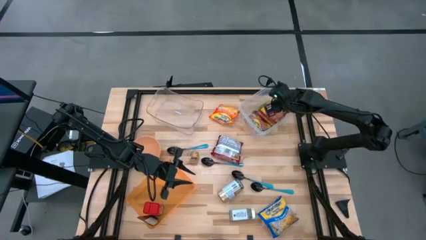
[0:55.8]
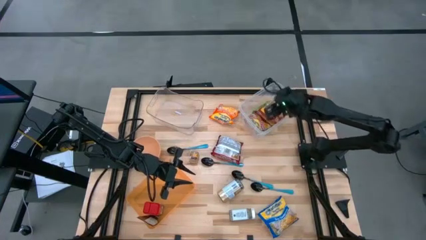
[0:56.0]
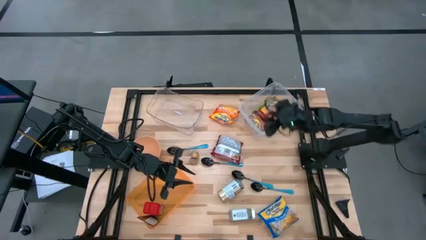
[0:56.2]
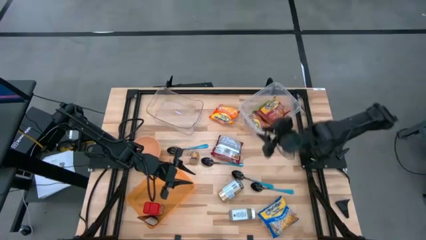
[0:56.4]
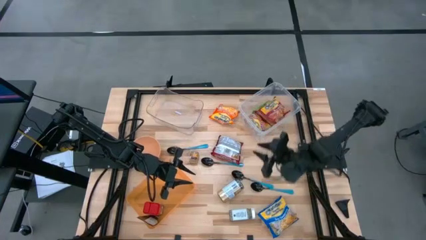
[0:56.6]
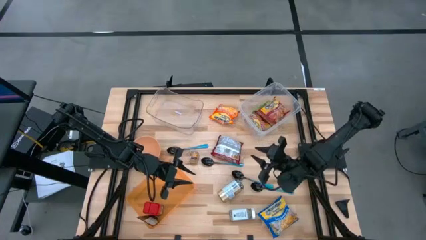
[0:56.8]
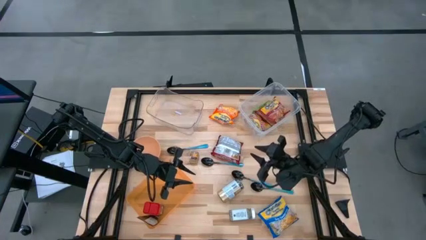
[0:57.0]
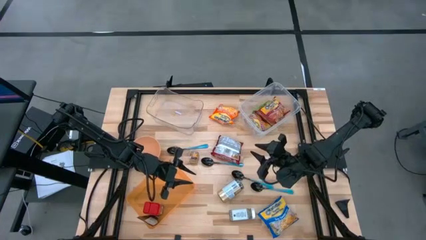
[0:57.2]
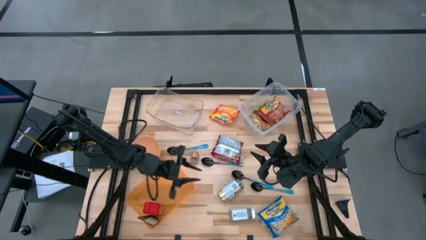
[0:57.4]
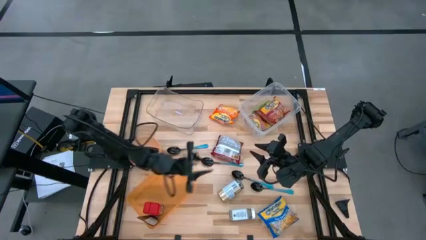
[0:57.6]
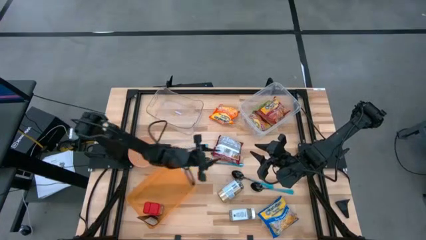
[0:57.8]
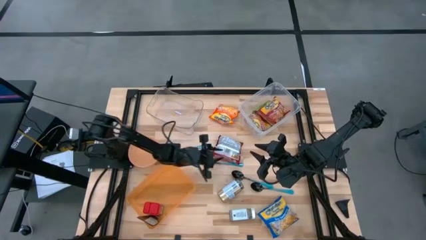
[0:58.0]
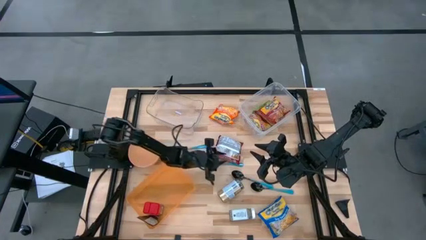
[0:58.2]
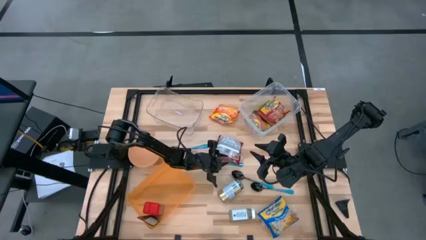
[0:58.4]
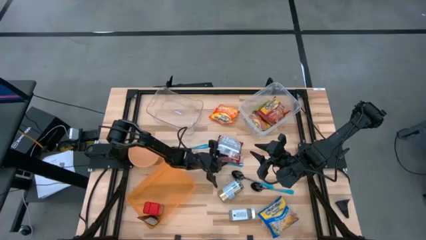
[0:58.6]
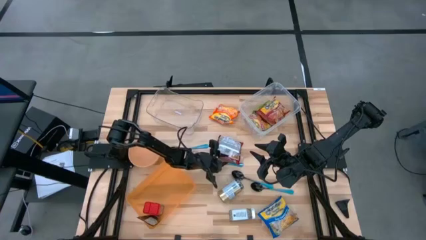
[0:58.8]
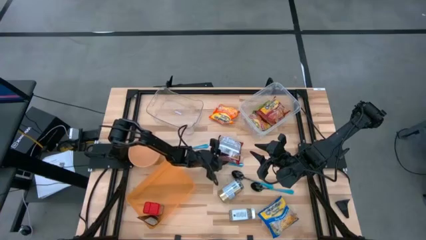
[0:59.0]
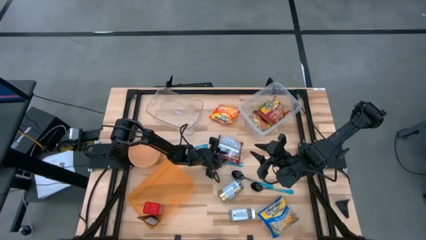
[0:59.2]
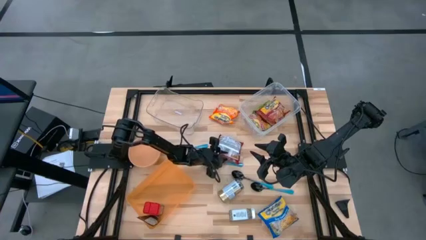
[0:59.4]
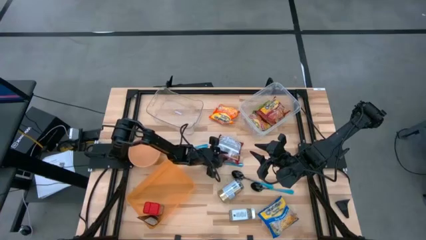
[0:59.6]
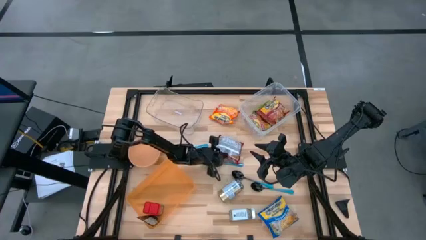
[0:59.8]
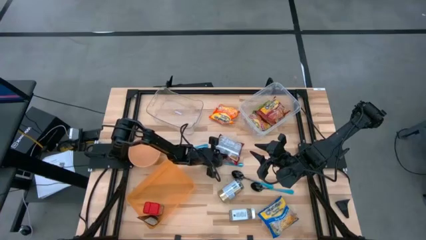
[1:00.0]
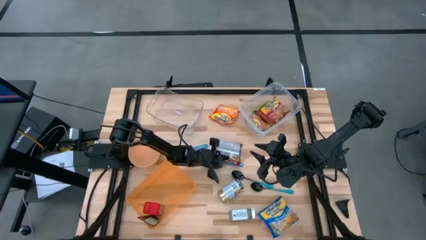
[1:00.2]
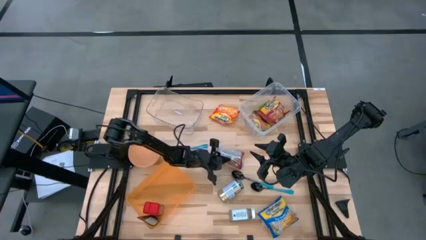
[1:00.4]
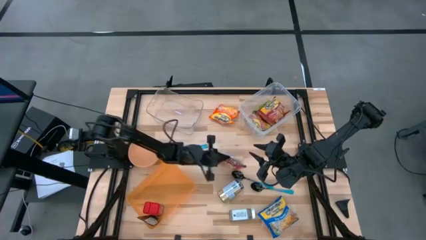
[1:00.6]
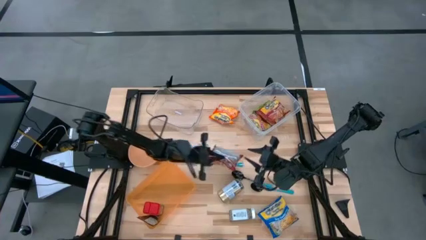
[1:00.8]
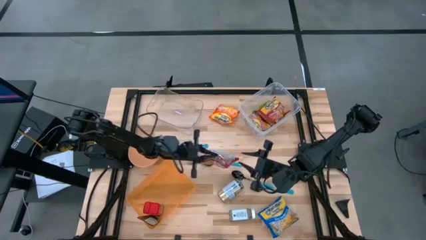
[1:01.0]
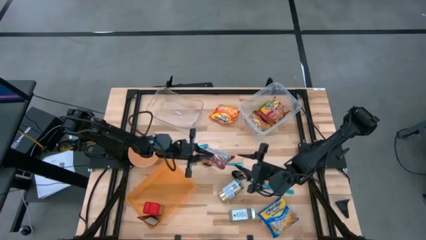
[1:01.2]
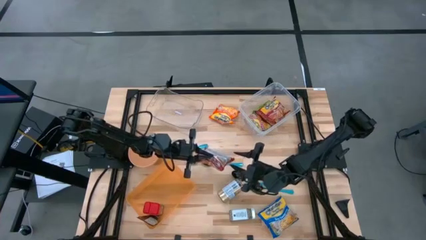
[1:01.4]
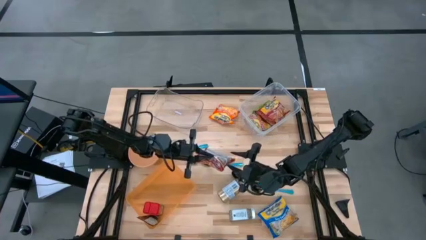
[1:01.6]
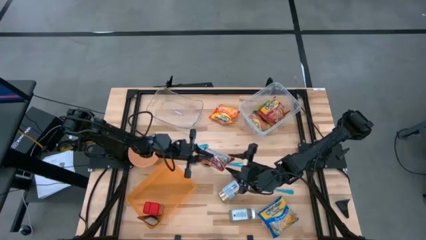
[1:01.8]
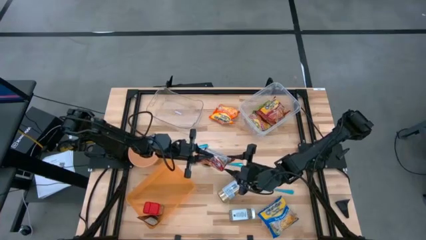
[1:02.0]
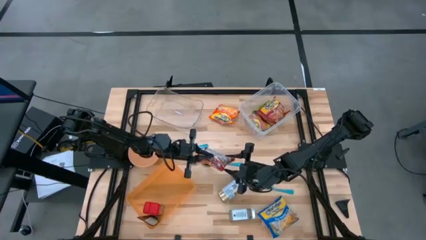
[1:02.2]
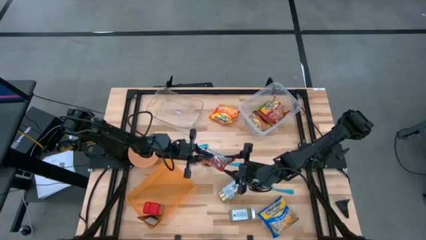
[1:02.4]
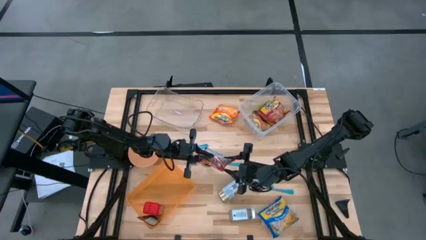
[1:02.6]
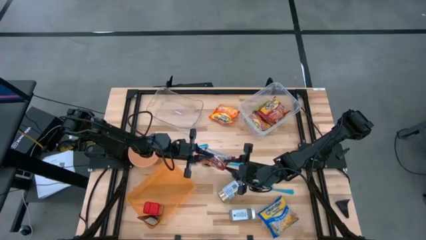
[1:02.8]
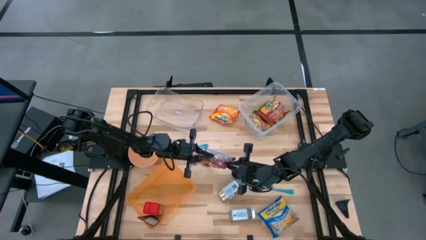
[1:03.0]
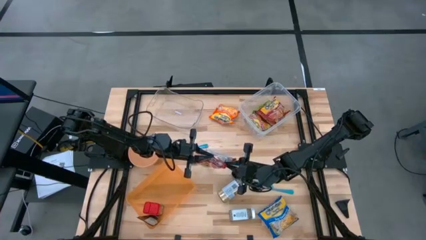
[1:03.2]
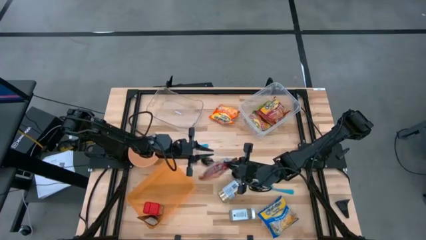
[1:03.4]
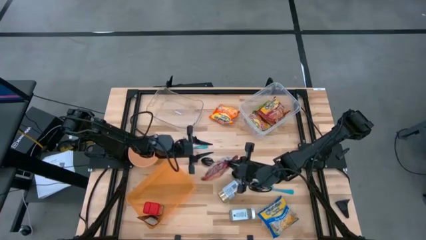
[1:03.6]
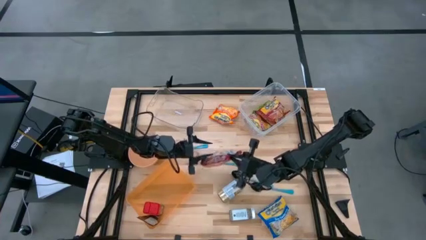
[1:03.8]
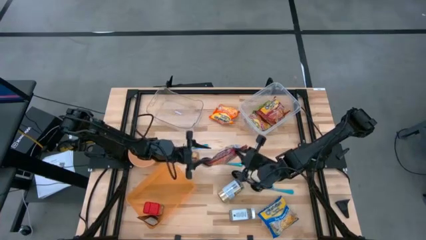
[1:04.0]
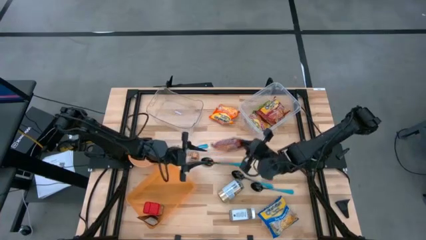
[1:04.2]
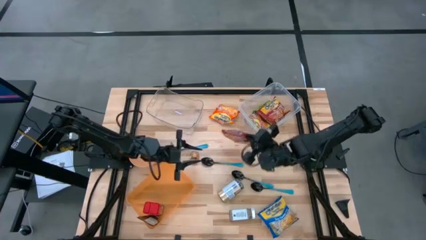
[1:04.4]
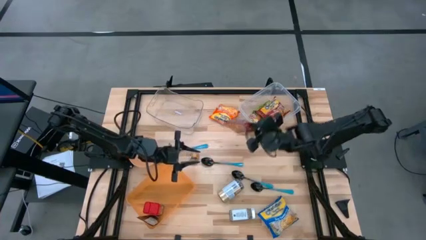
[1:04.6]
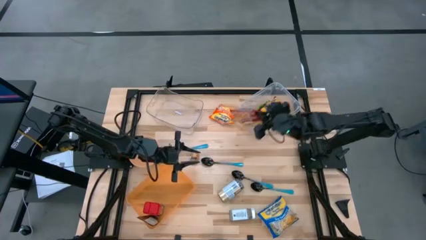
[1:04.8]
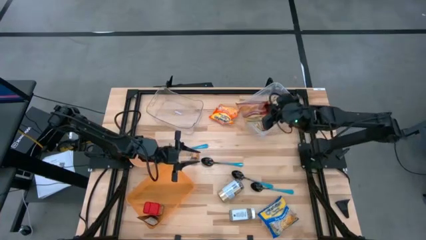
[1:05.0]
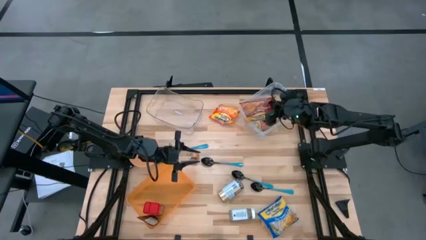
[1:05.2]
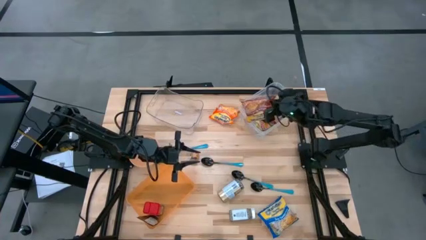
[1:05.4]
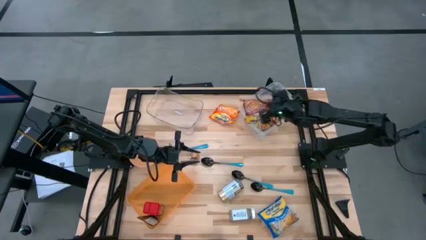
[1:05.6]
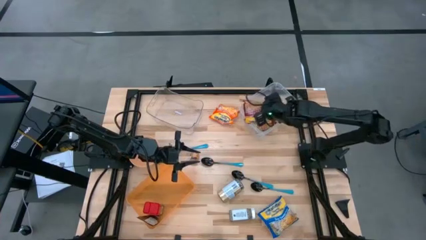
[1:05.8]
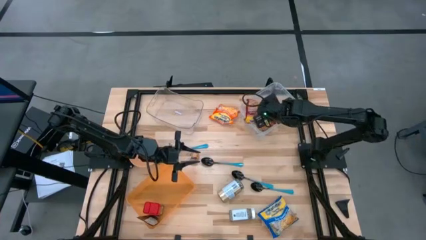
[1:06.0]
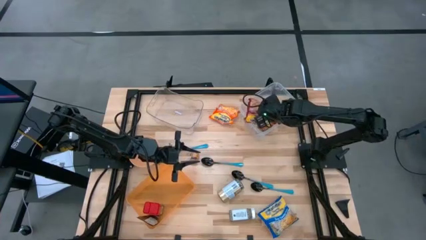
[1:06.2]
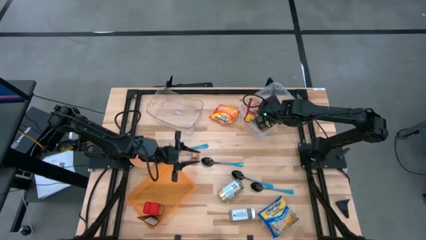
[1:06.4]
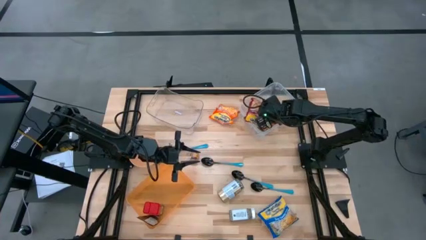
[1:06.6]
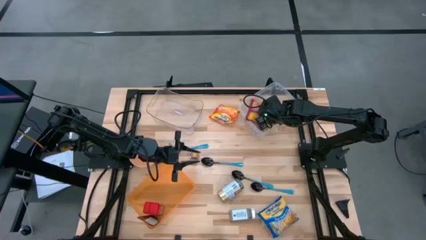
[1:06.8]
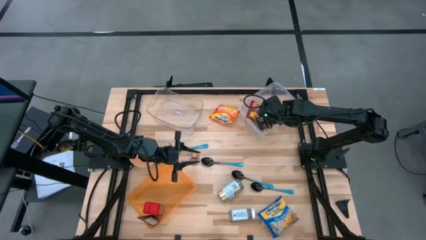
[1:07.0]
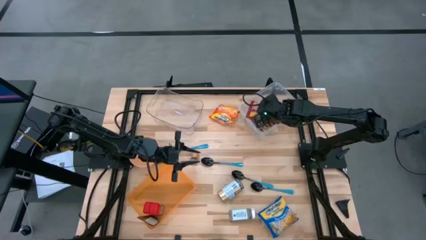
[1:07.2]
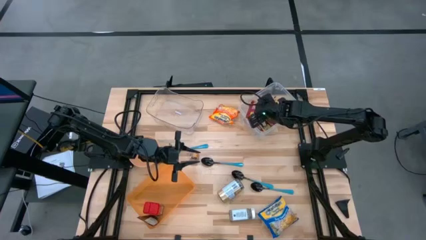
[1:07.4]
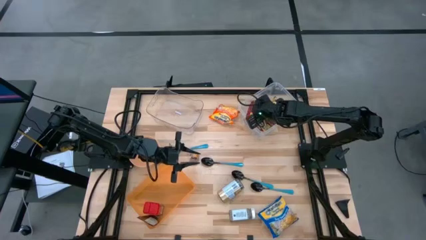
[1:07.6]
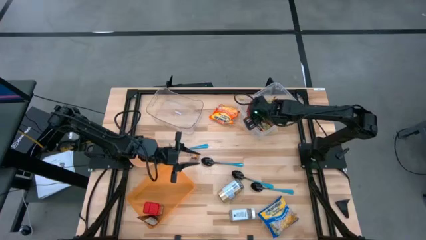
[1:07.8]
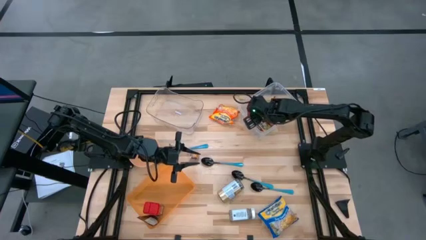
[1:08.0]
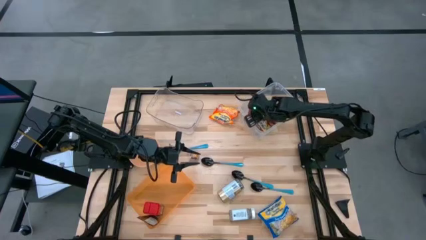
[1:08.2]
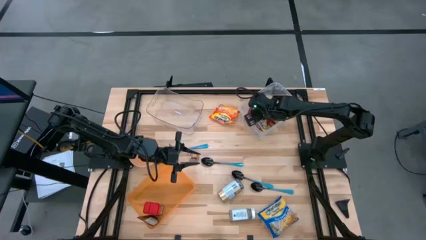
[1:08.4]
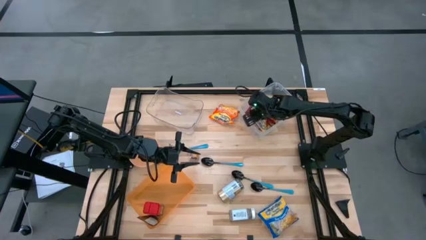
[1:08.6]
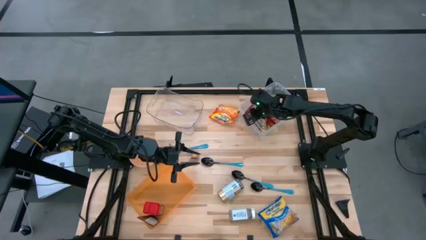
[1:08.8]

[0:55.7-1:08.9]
Task: Pick & Place Food Item
Put the red noodle pack into the right transparent bin
